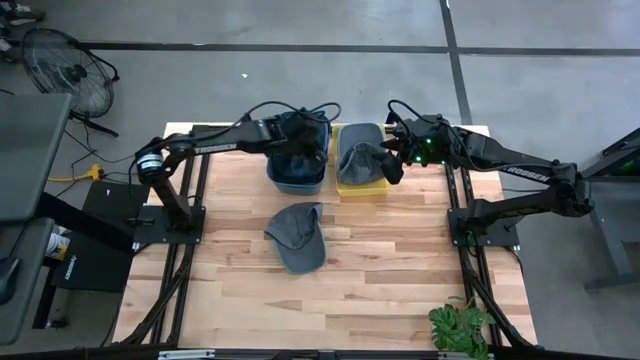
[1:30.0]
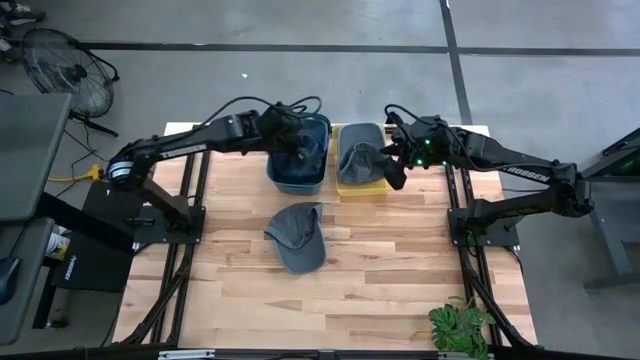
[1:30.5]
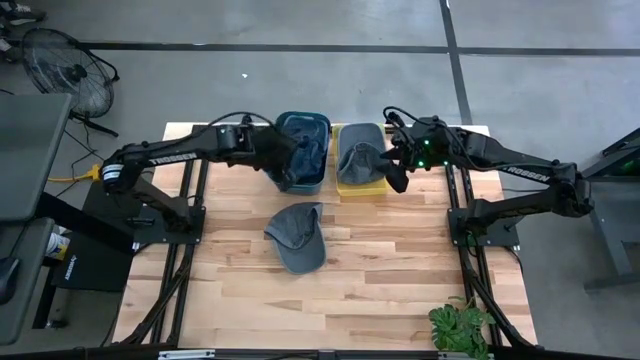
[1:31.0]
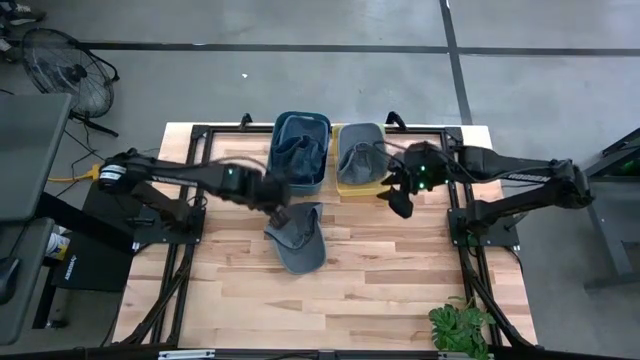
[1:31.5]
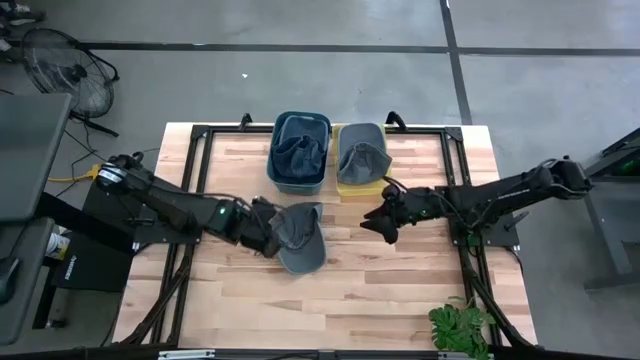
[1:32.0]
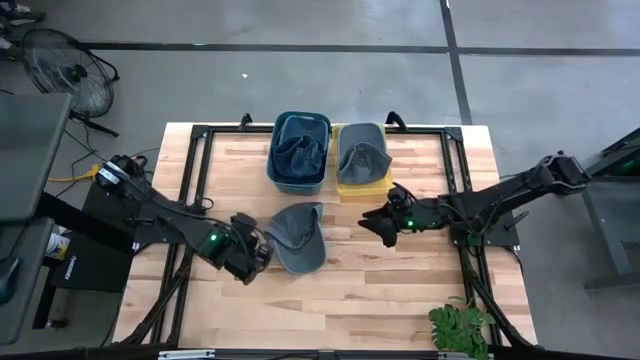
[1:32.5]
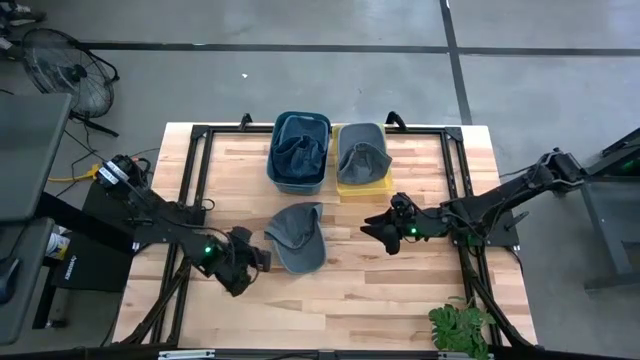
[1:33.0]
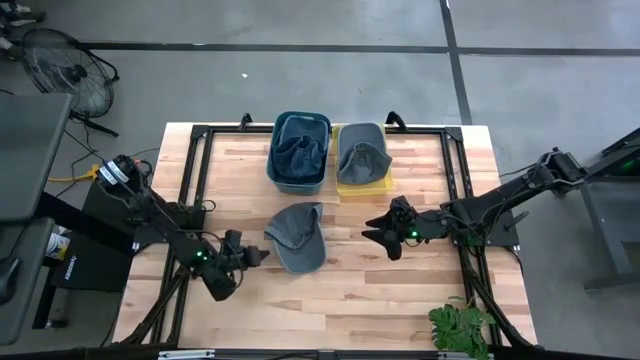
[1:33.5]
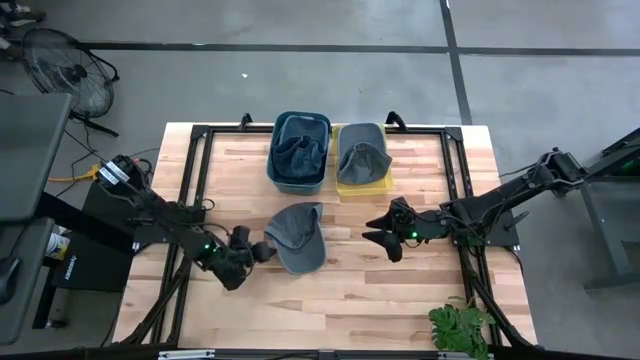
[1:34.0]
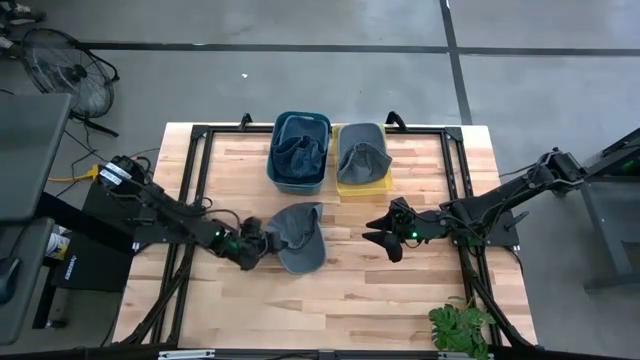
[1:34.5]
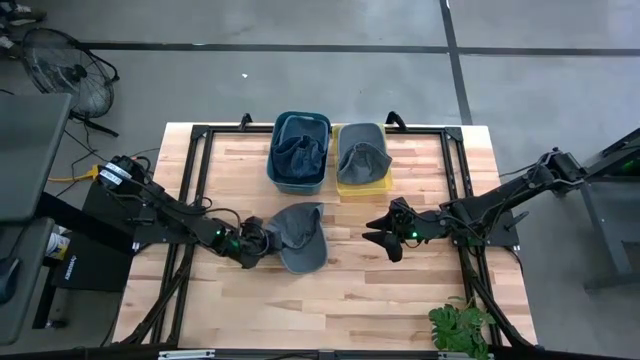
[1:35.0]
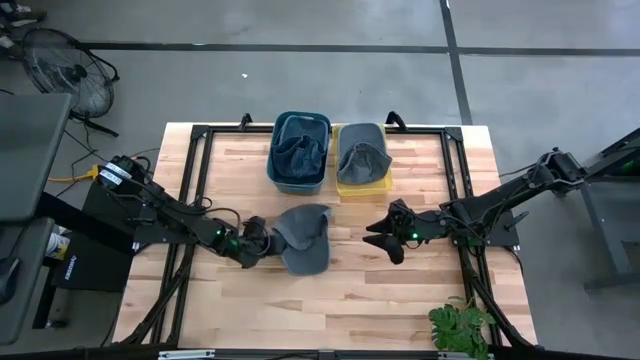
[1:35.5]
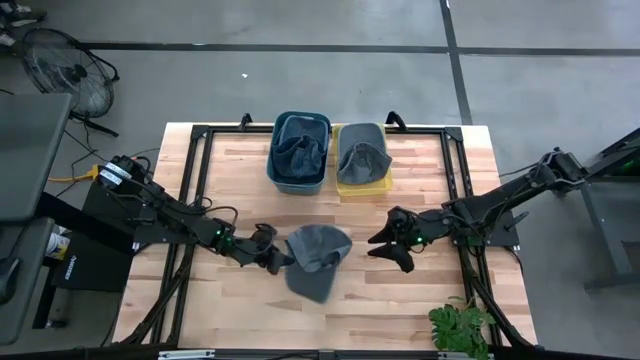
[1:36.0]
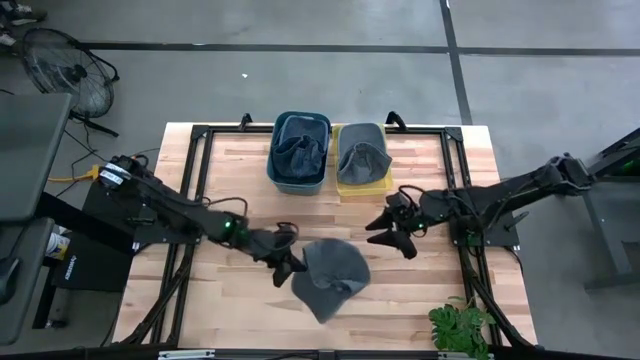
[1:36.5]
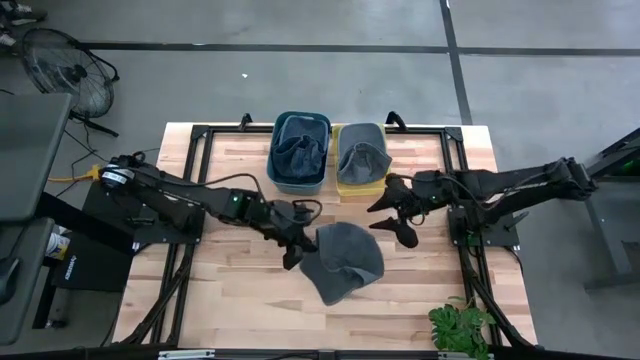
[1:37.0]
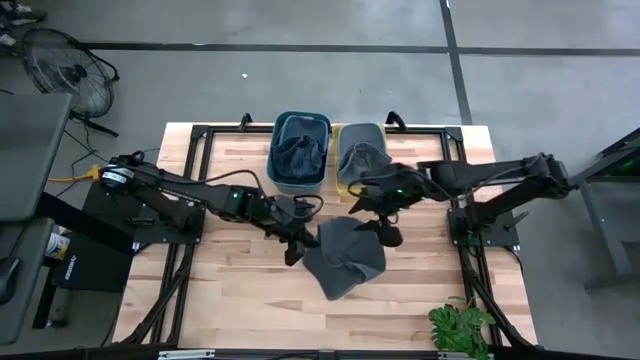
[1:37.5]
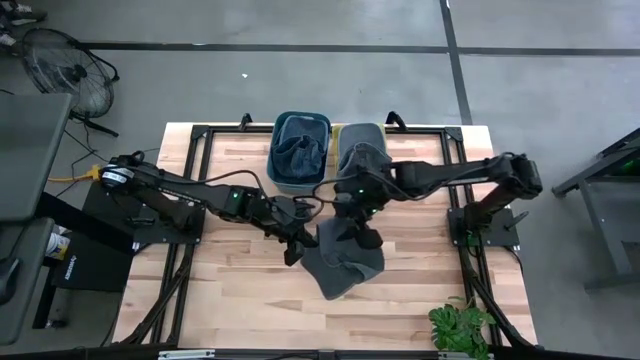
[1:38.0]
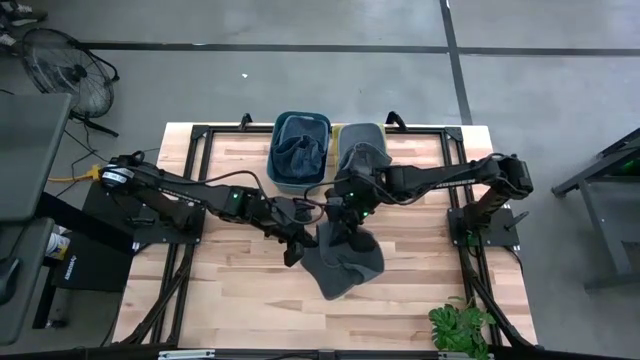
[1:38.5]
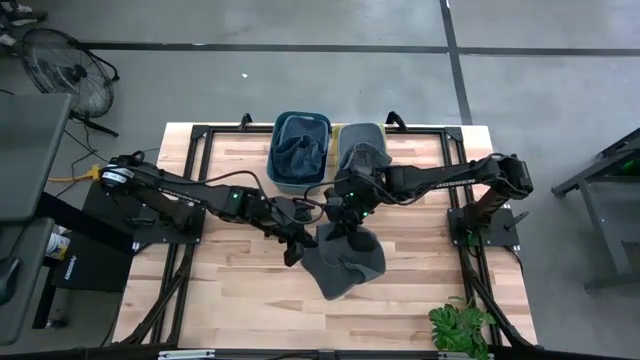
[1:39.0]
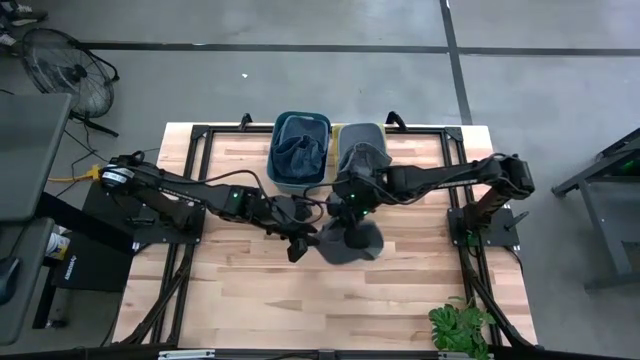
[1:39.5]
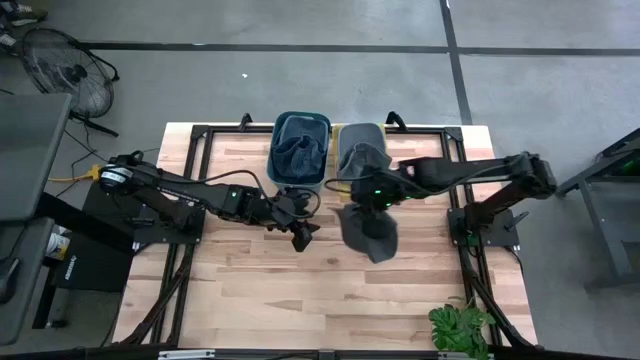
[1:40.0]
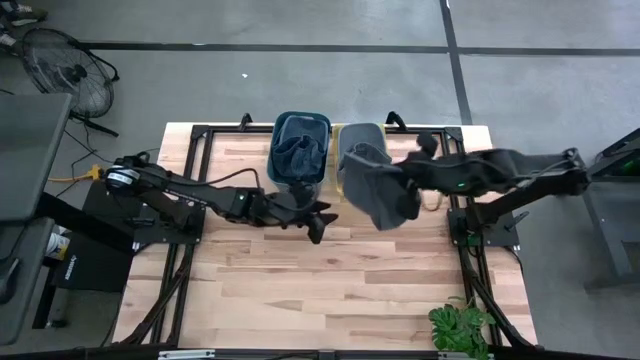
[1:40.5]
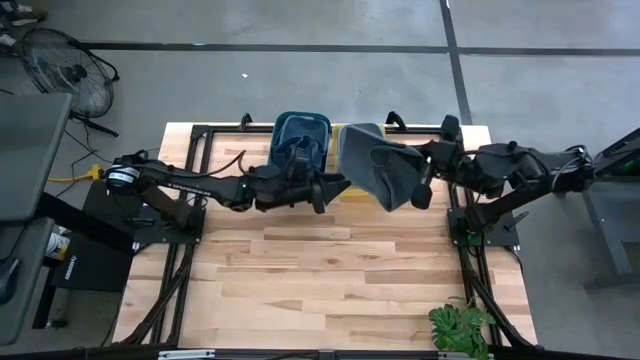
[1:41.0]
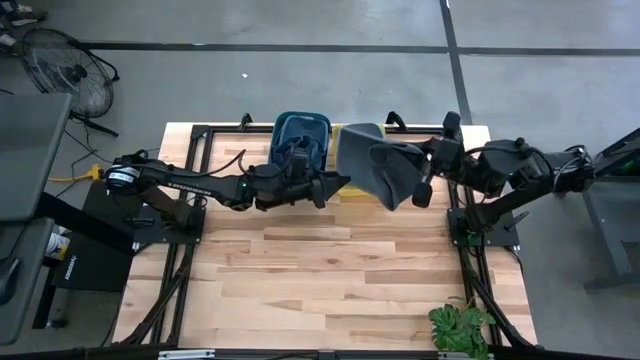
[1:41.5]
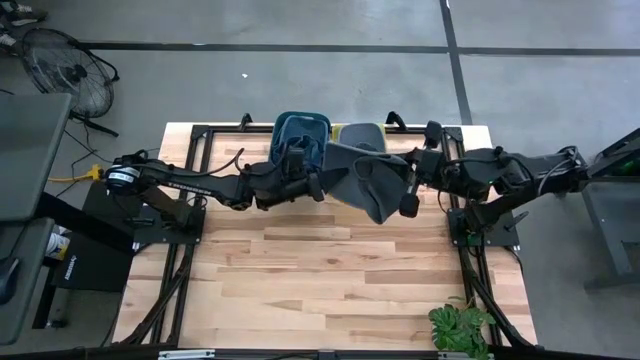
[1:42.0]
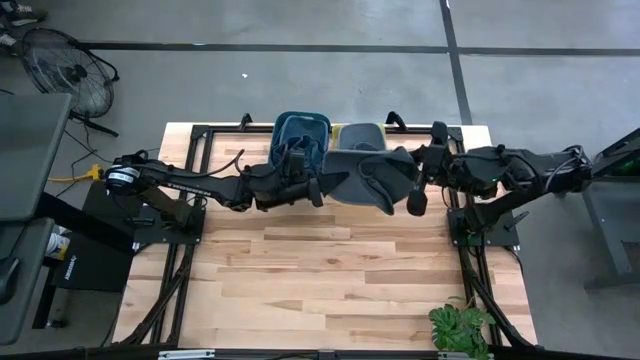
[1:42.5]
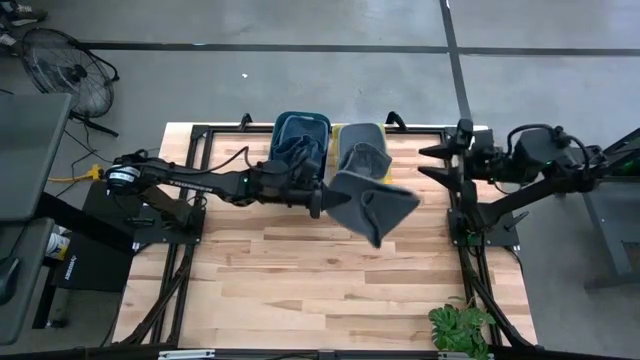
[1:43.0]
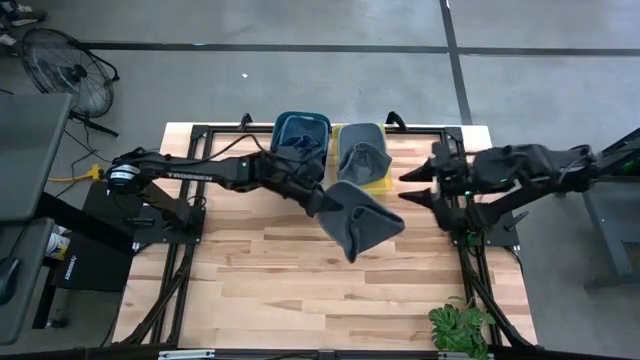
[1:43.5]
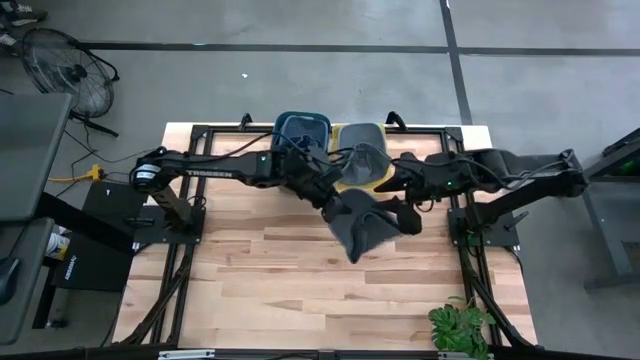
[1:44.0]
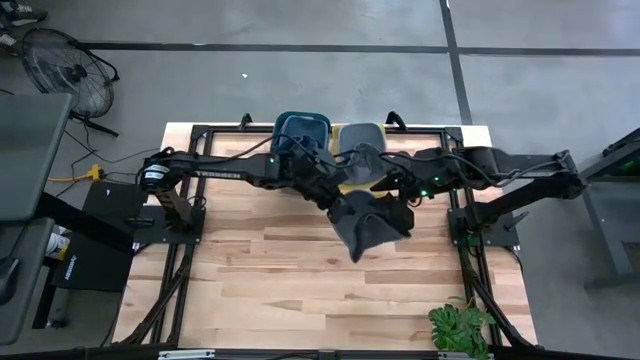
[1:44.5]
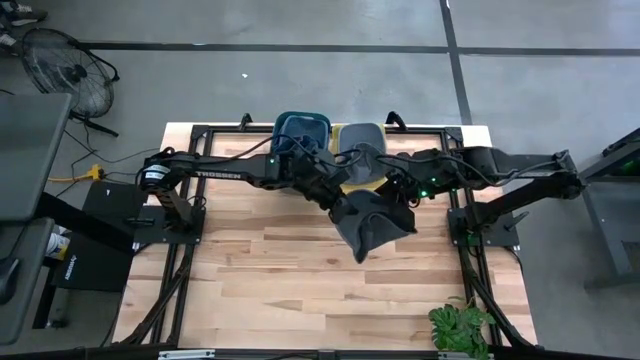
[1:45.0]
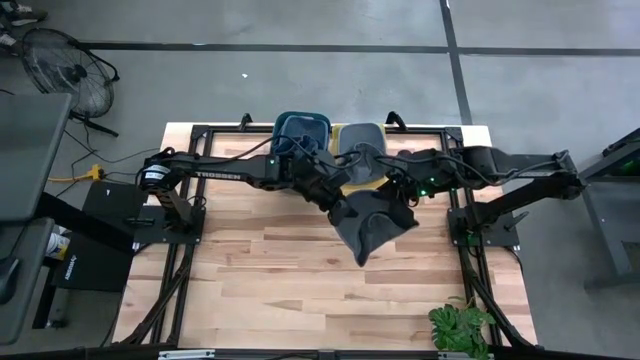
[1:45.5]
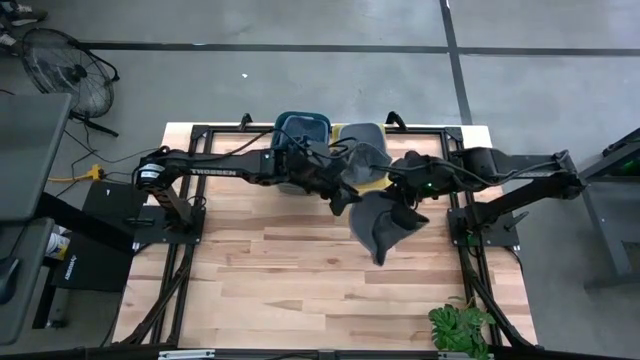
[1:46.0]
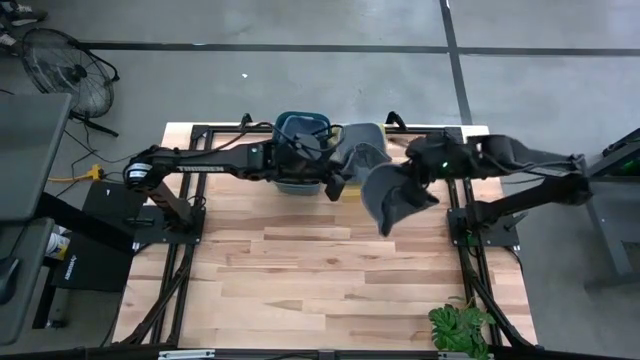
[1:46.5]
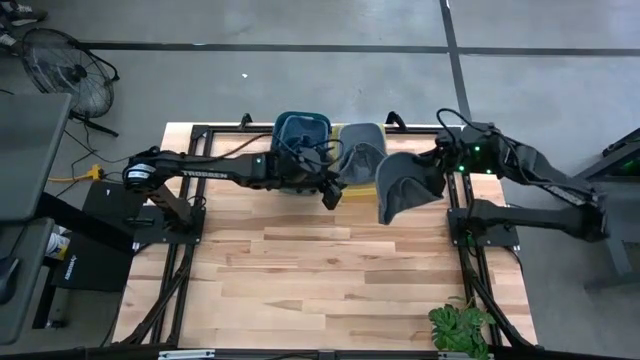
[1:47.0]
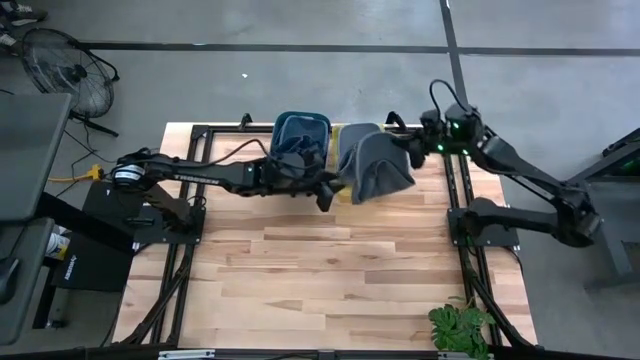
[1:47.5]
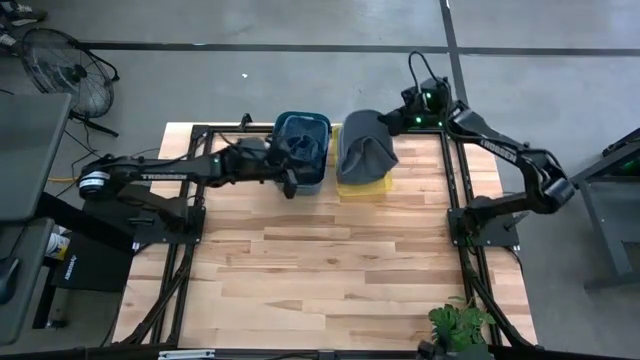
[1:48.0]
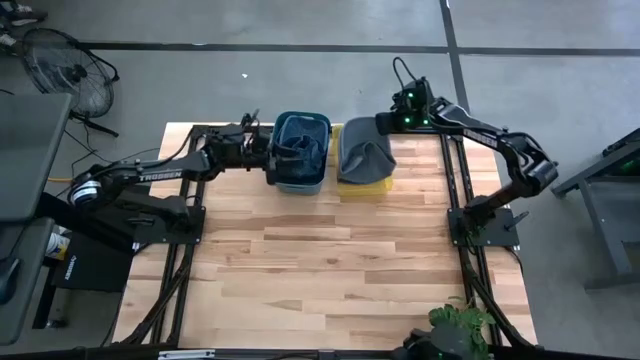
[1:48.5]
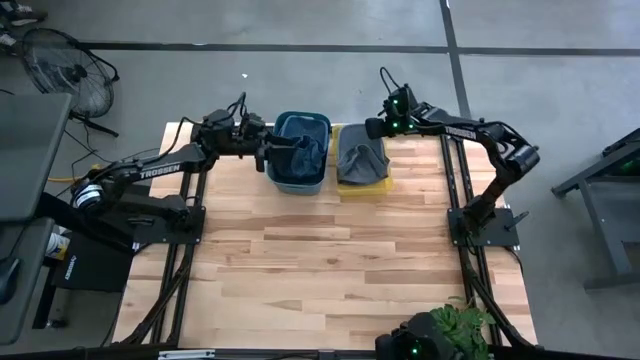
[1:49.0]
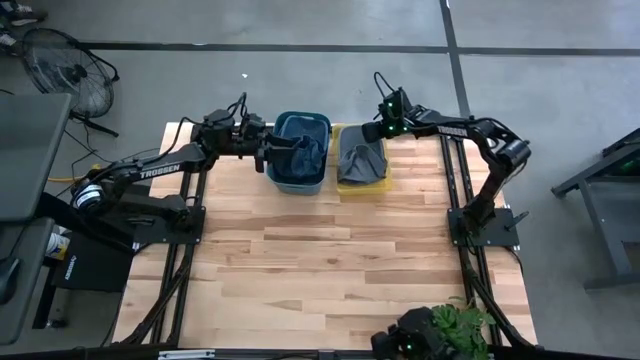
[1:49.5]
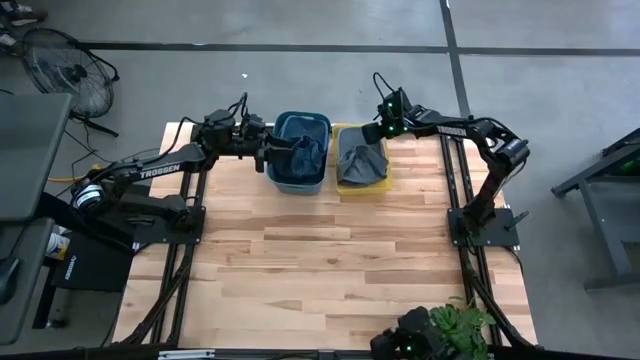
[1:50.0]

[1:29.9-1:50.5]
Task: Pick & Place hat
Put the gray cap into the yellow bin
